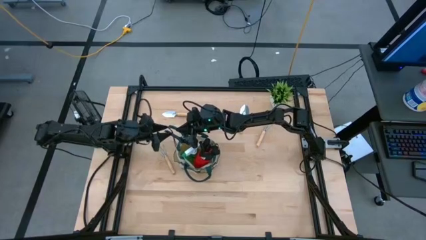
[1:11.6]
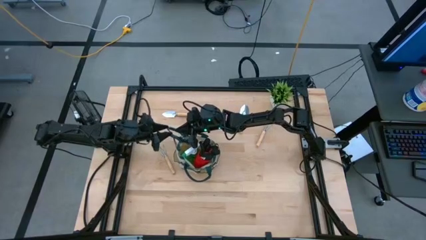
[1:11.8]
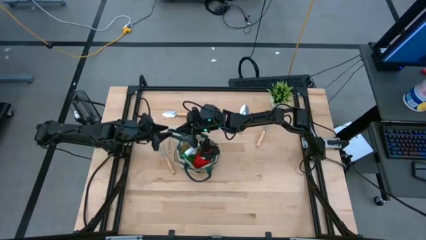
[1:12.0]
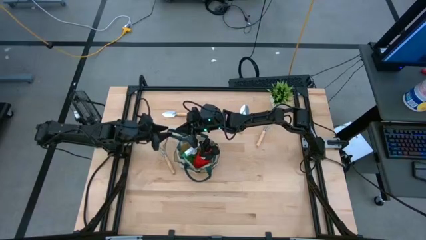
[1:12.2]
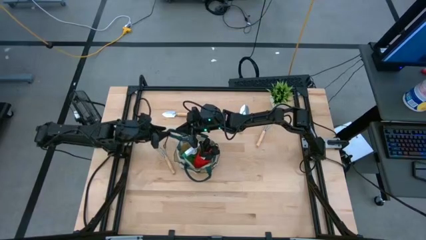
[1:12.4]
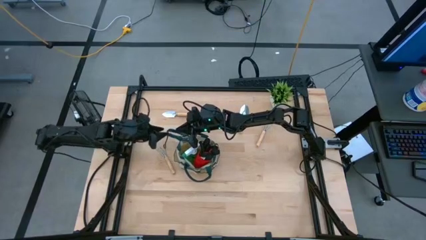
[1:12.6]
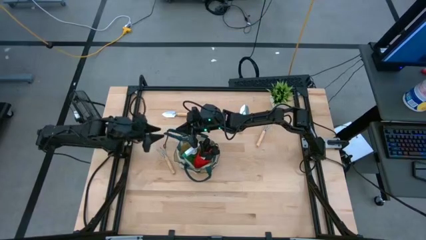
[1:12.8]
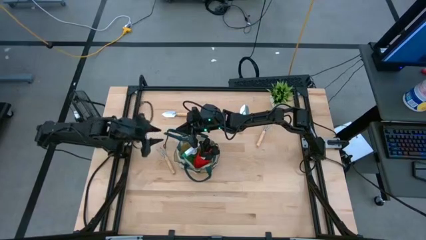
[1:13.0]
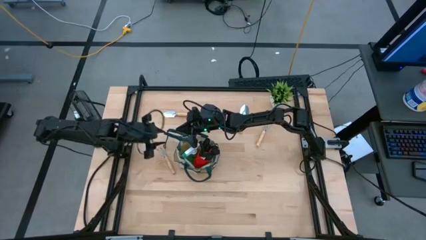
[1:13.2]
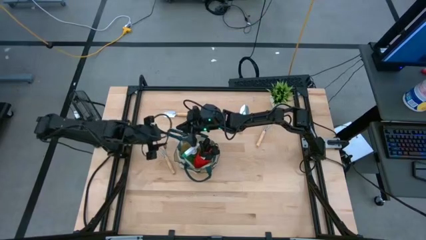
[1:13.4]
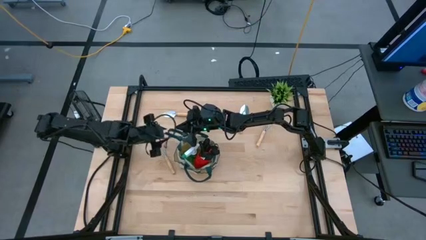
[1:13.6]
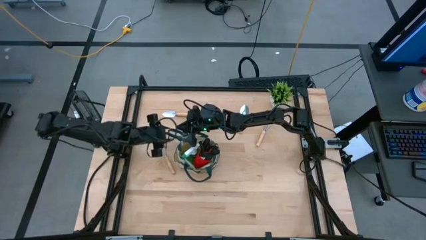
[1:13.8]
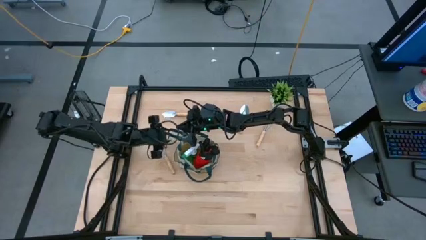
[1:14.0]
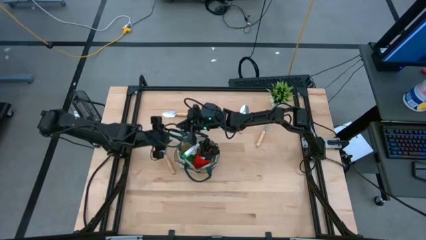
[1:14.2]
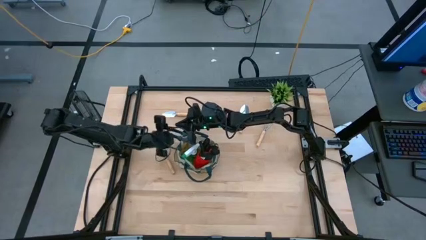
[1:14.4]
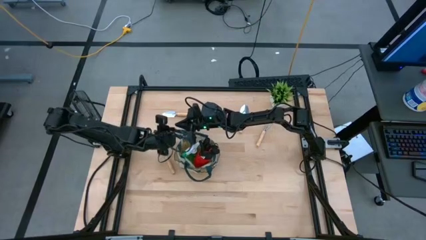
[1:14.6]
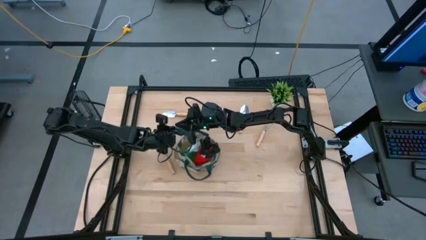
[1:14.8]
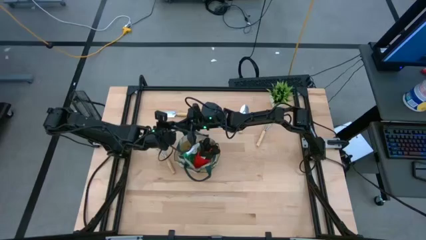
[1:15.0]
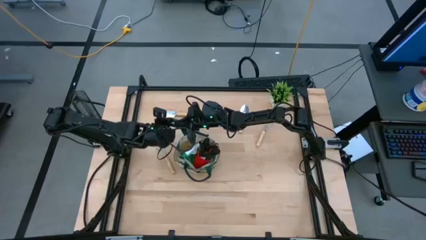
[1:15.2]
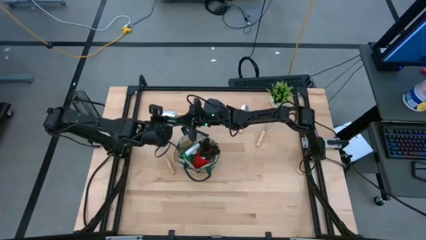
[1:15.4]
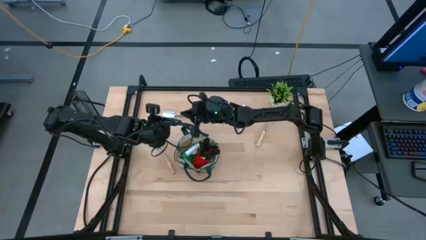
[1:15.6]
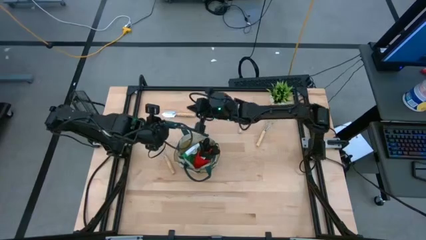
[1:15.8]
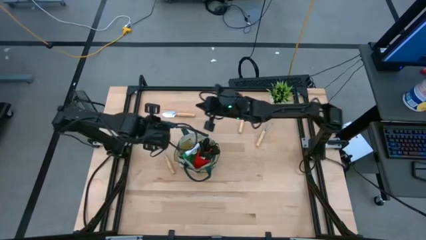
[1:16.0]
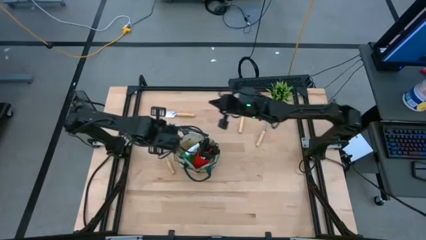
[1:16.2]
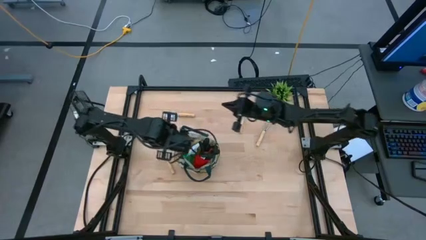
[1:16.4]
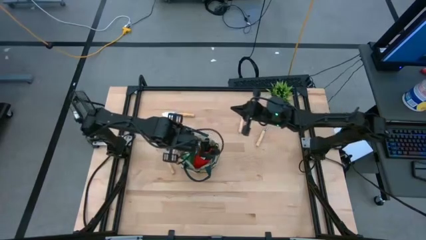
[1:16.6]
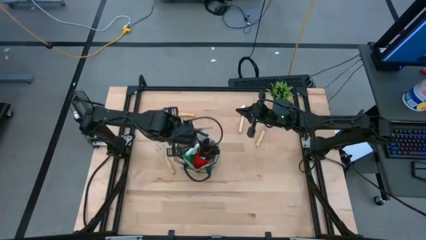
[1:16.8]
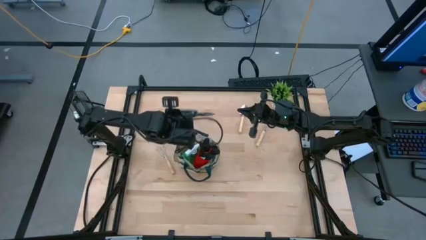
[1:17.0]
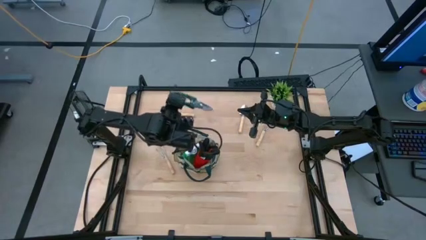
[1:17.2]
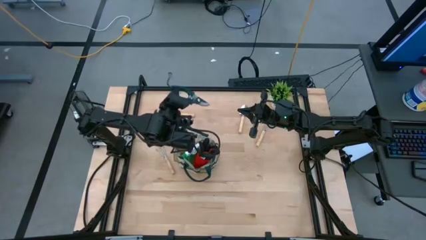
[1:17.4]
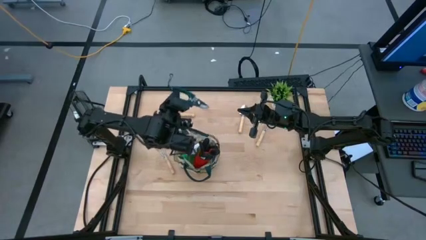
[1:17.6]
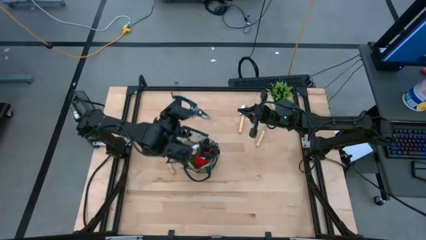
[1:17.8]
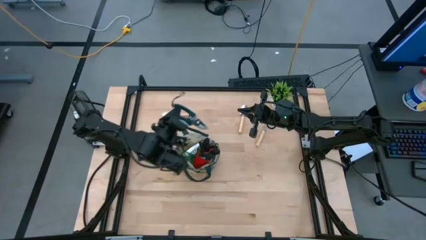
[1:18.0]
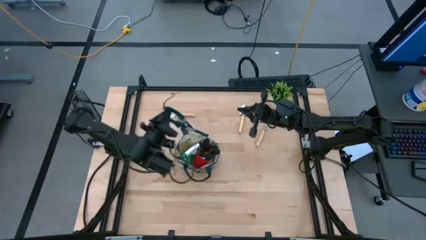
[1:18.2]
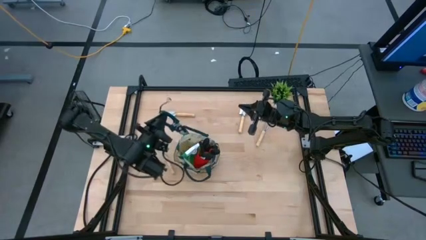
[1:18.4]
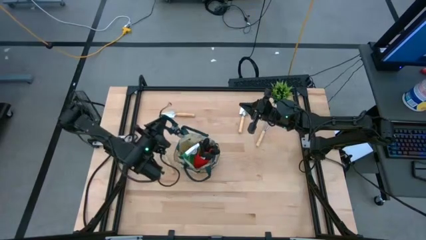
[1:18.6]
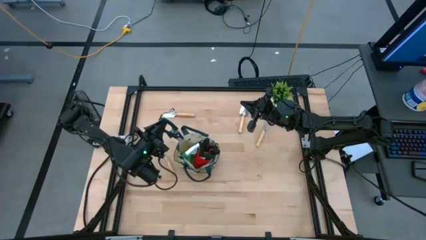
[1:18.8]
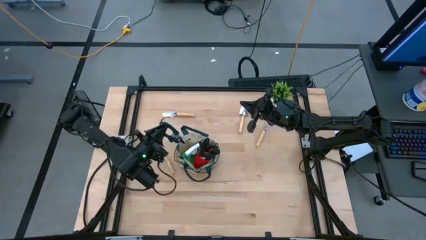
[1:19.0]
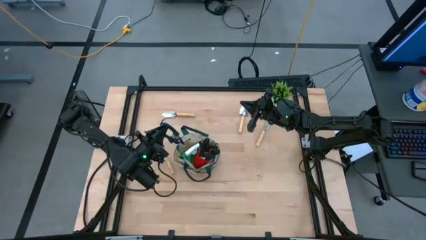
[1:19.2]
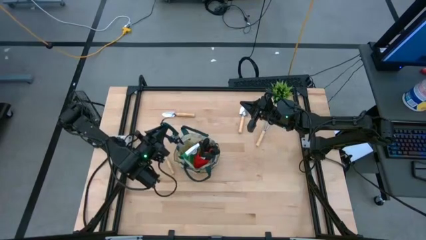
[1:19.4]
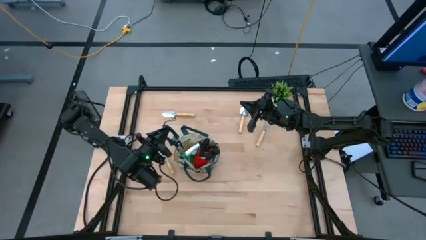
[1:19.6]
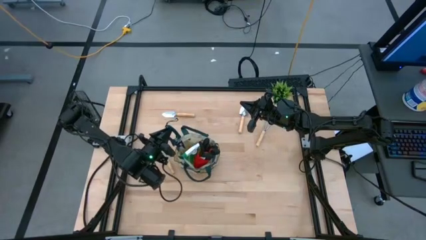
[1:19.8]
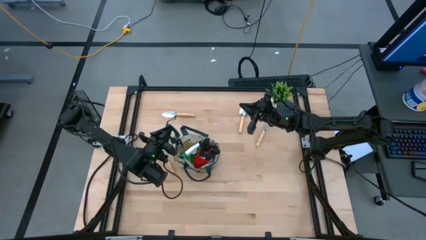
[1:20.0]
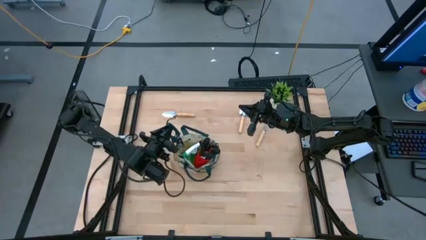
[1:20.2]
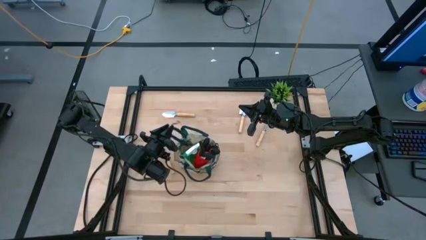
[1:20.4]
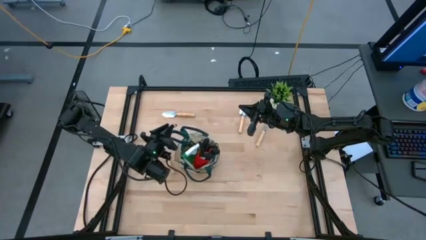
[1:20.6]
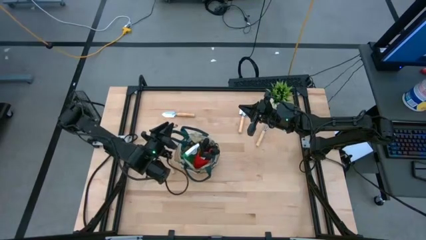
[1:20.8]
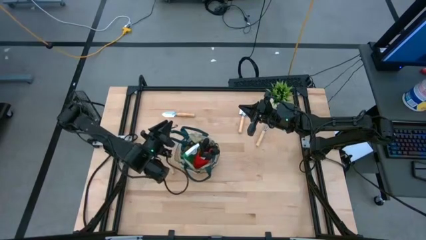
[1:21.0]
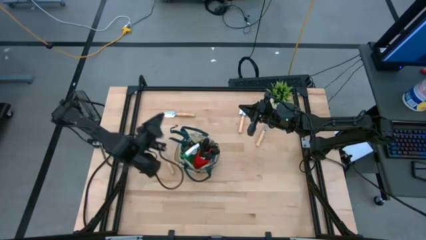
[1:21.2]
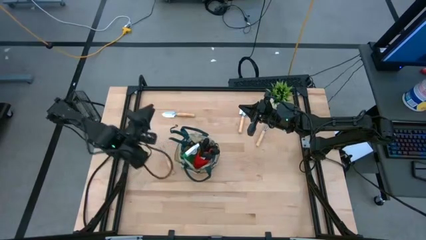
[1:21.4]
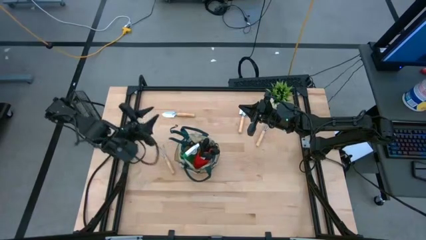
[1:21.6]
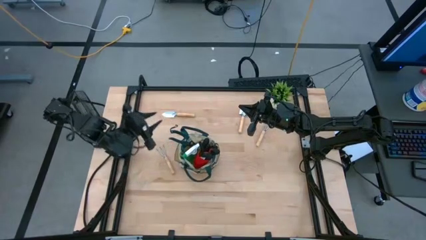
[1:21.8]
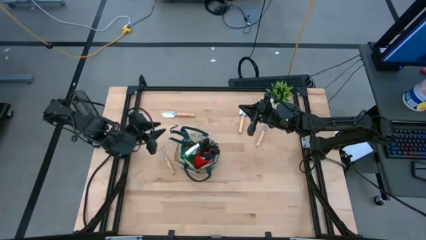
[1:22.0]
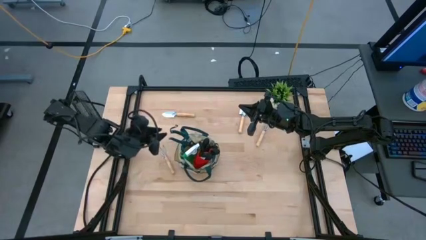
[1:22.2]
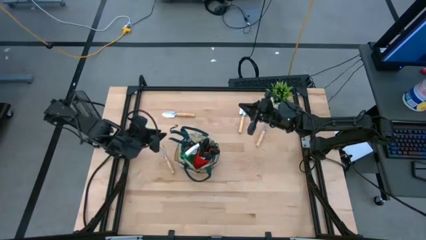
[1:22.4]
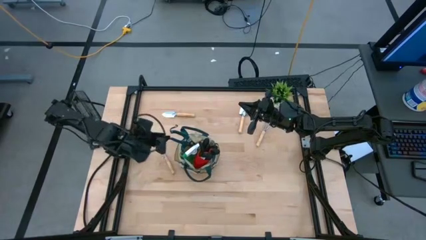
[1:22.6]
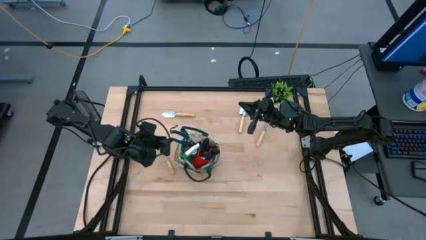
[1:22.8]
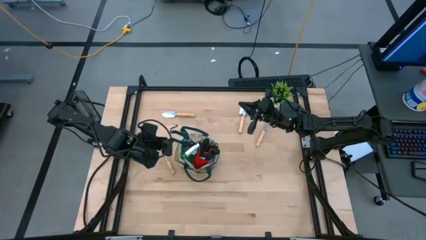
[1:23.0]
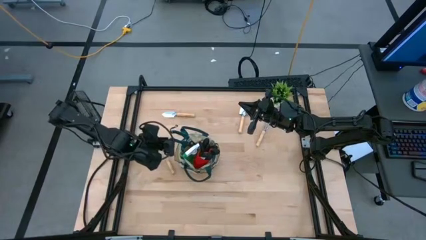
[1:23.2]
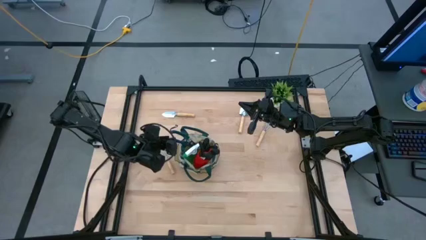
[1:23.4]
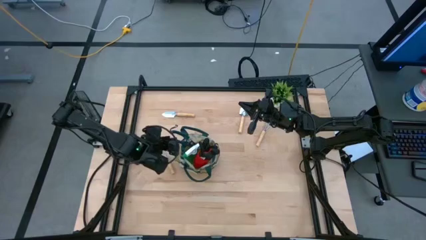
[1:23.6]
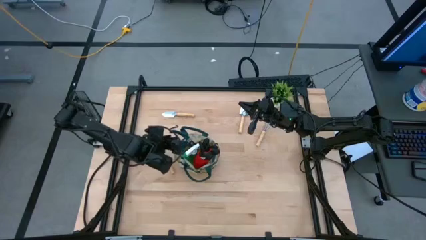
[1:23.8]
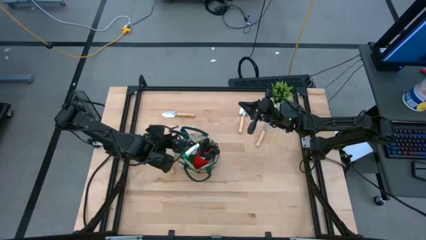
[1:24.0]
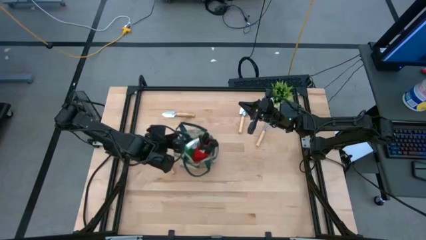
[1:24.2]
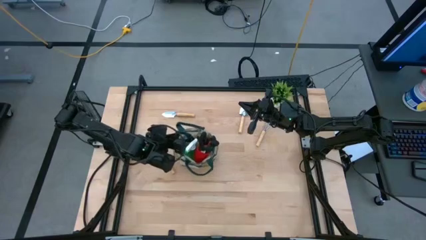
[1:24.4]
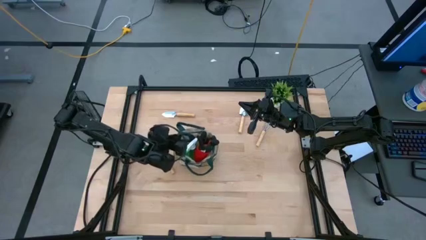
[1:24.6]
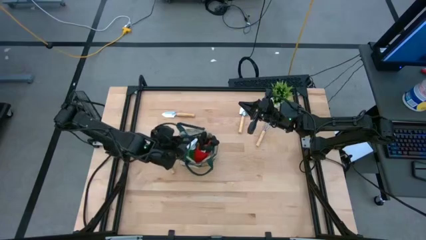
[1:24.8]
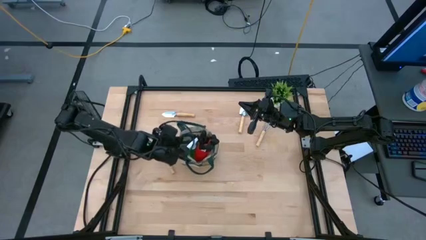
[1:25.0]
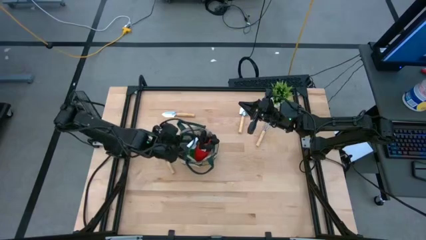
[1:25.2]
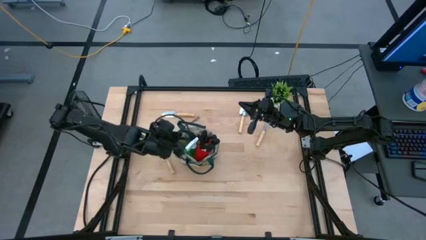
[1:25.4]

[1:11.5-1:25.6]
Task: Pick & Place Garden tools in Gardening bag
Put the green shear scissors into the brown gardening bag
